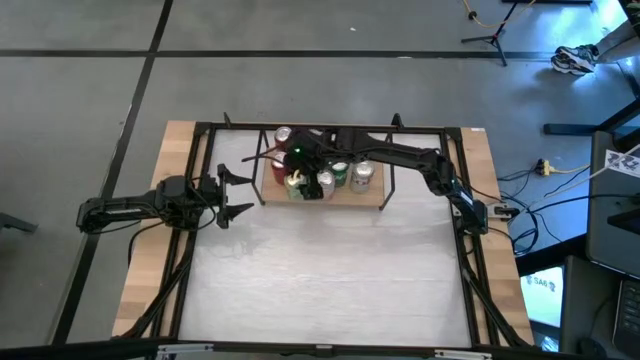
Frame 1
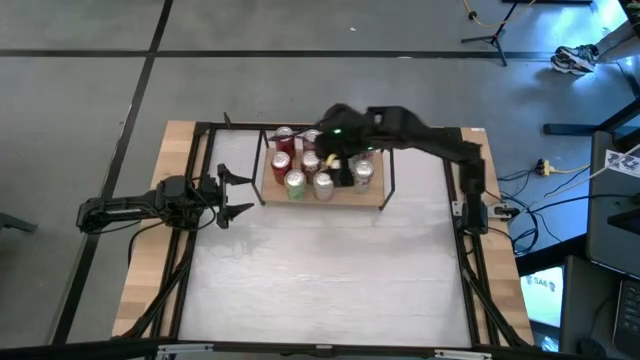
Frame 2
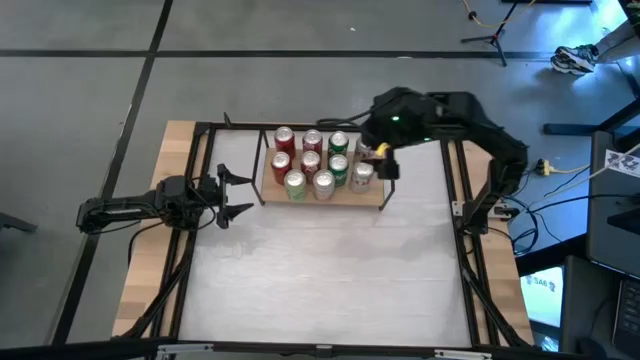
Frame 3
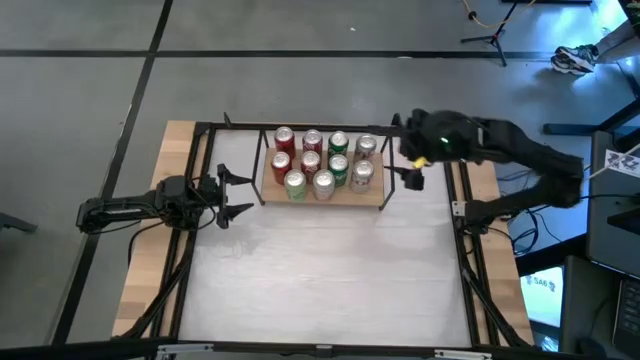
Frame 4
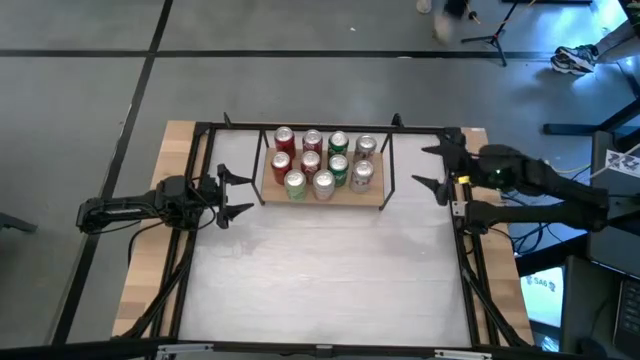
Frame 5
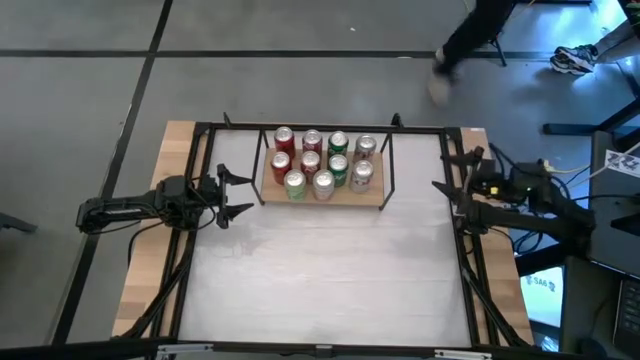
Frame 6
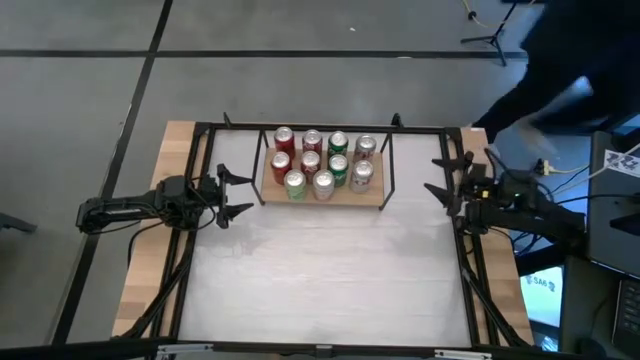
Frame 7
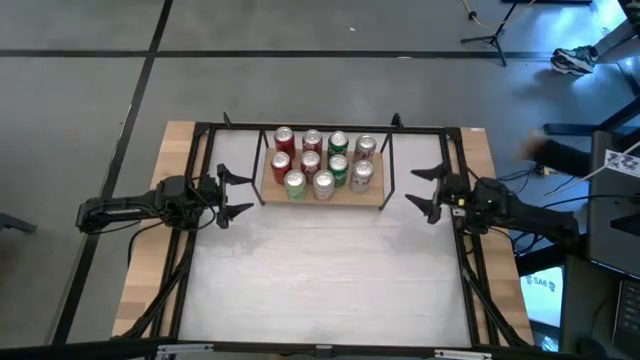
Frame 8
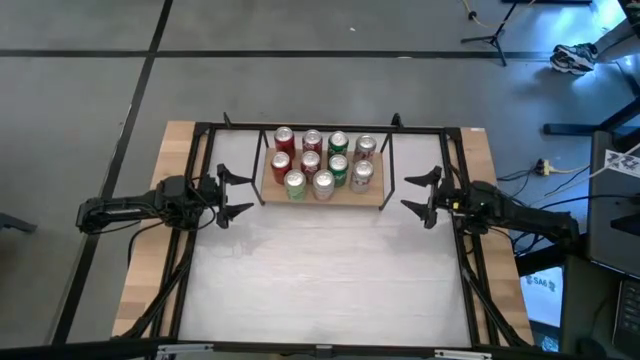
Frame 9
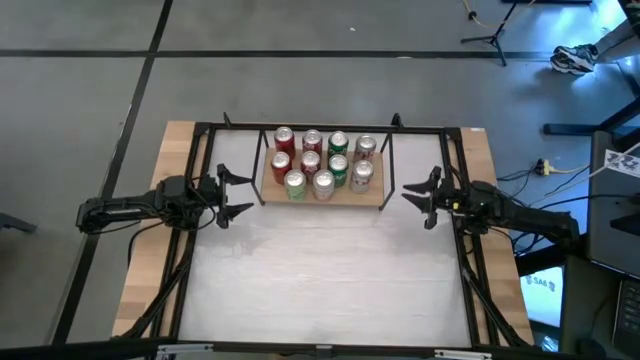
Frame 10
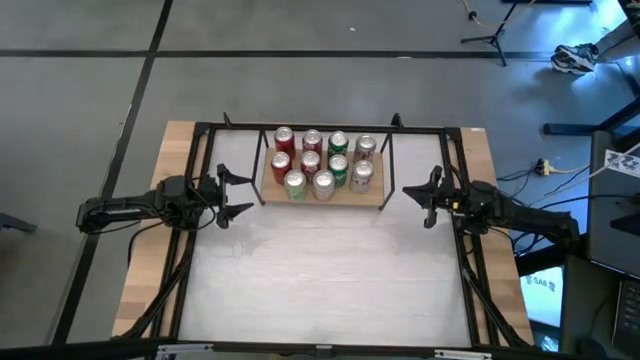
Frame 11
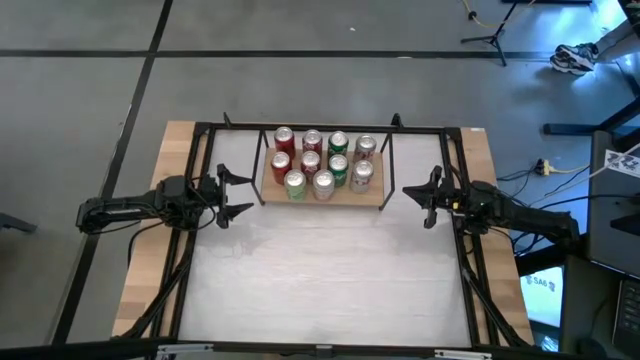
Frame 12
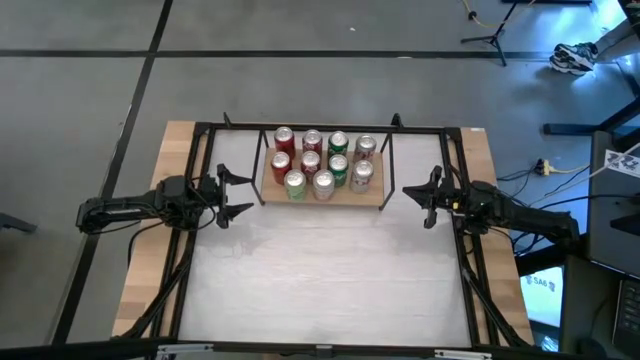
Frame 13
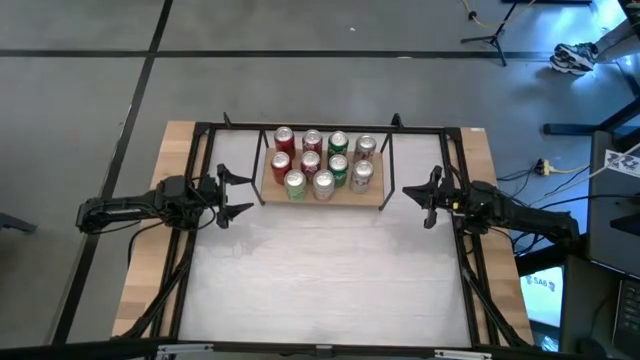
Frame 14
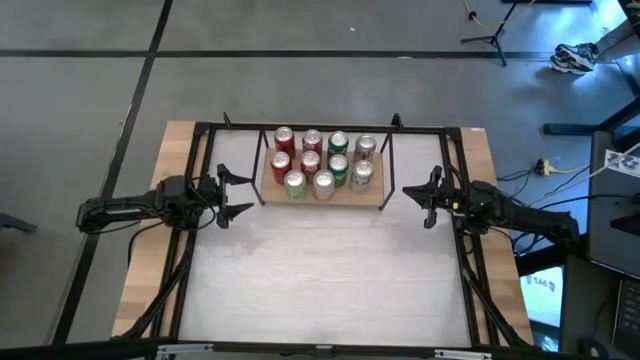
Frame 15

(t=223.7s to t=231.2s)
Task: Place canned beverage on shelf
Return to Home Position

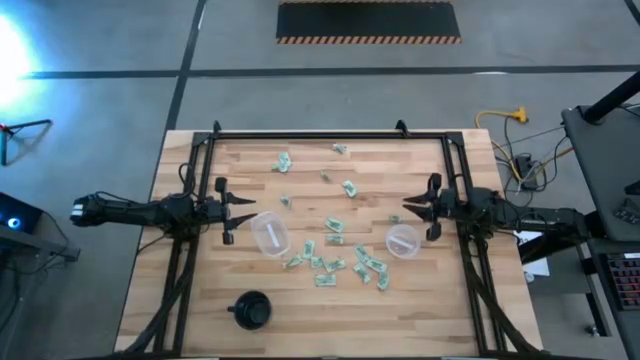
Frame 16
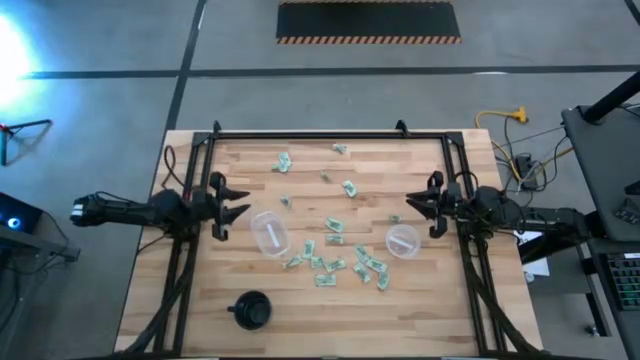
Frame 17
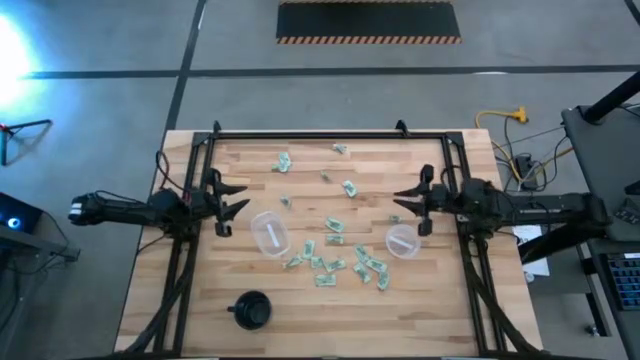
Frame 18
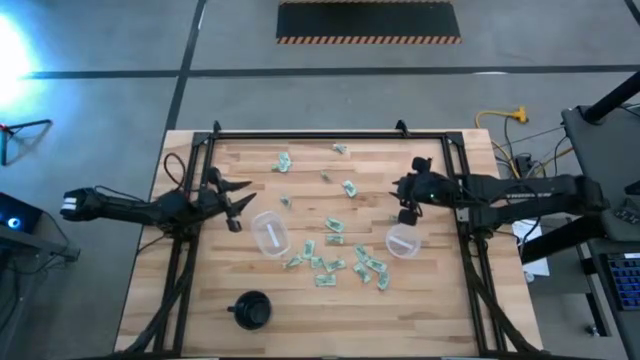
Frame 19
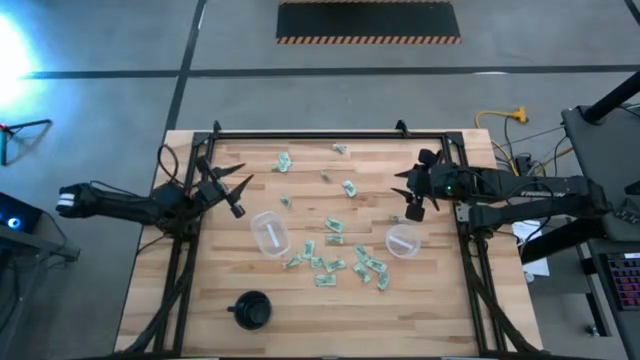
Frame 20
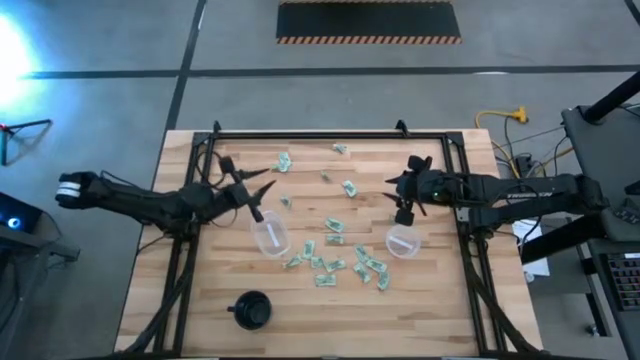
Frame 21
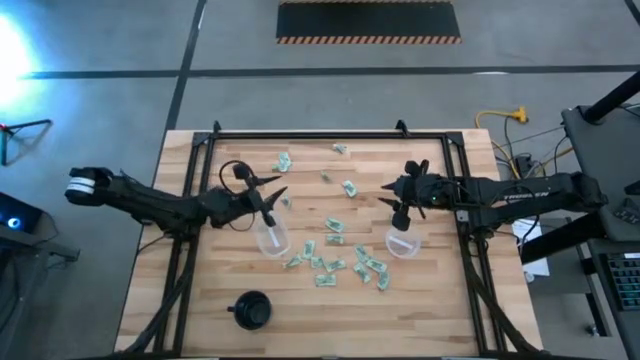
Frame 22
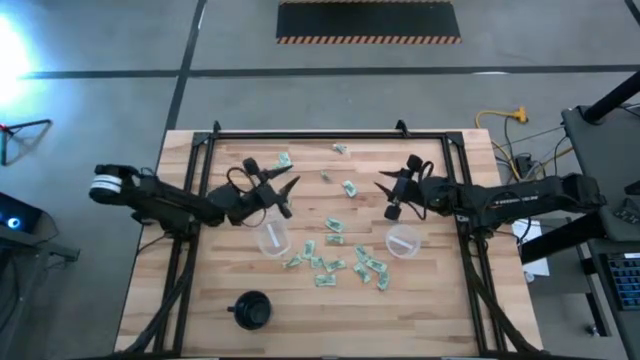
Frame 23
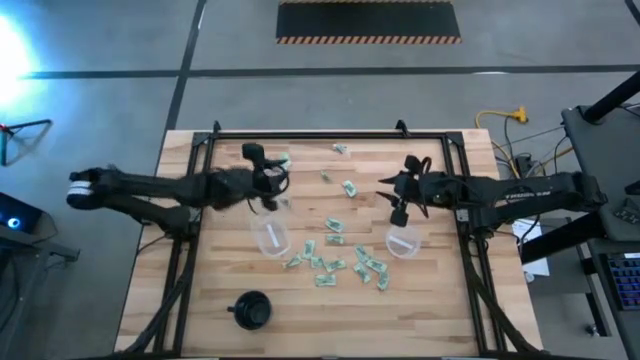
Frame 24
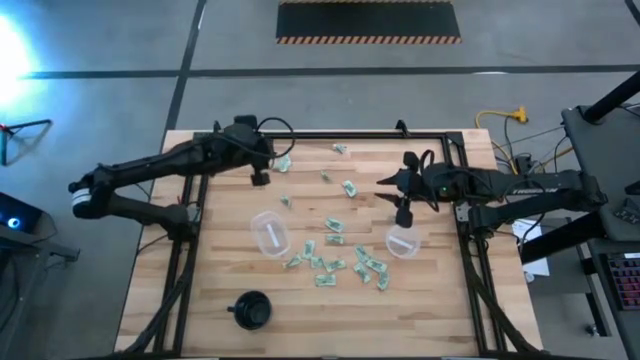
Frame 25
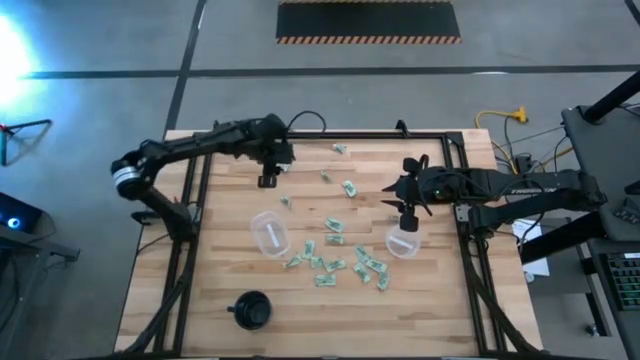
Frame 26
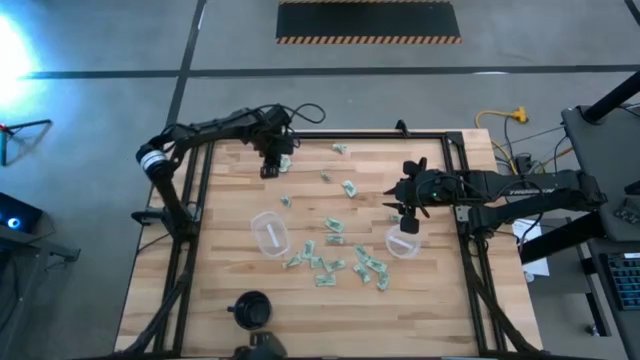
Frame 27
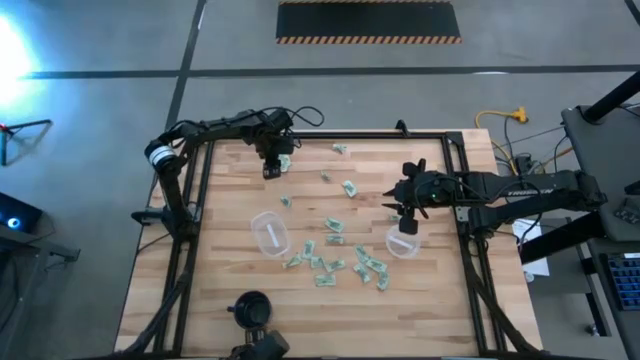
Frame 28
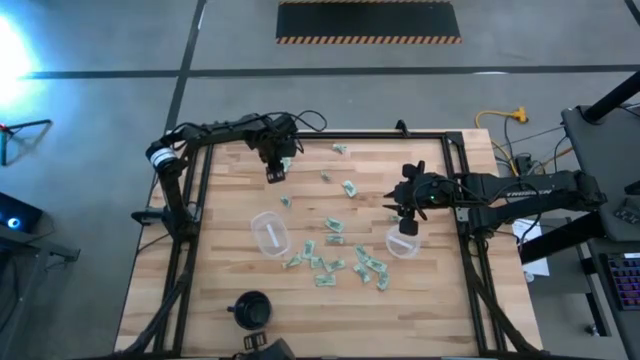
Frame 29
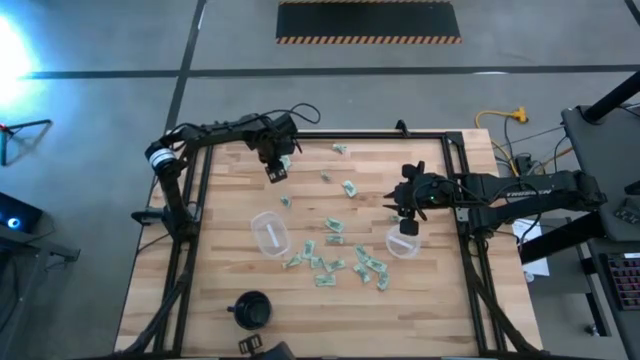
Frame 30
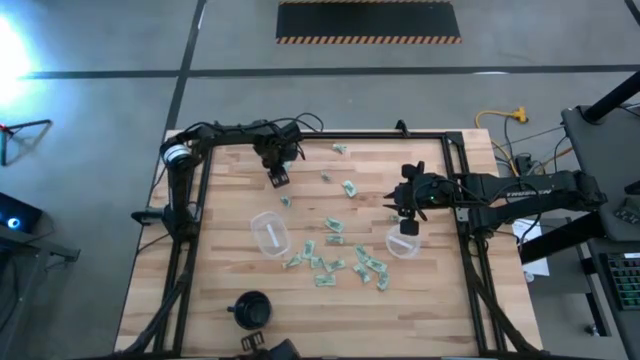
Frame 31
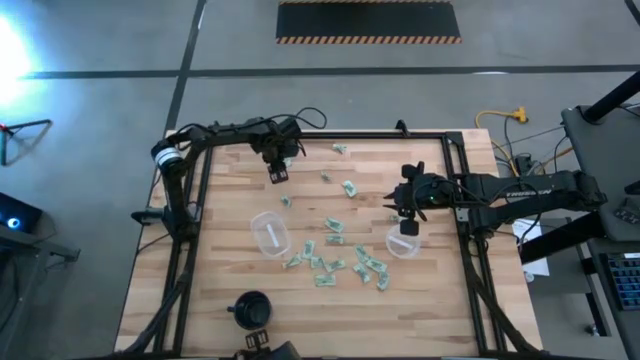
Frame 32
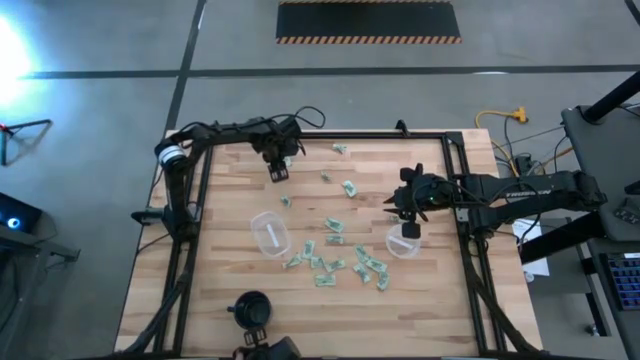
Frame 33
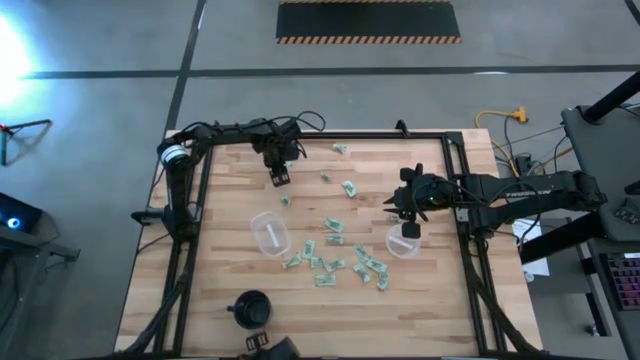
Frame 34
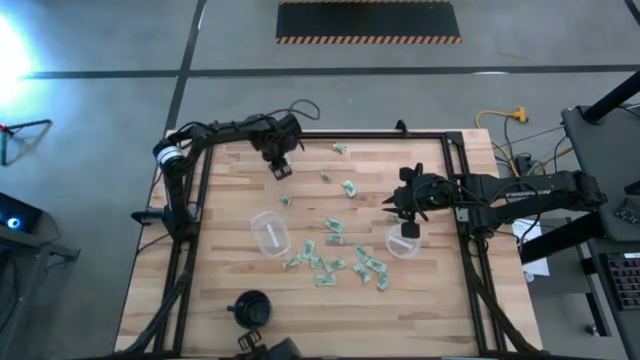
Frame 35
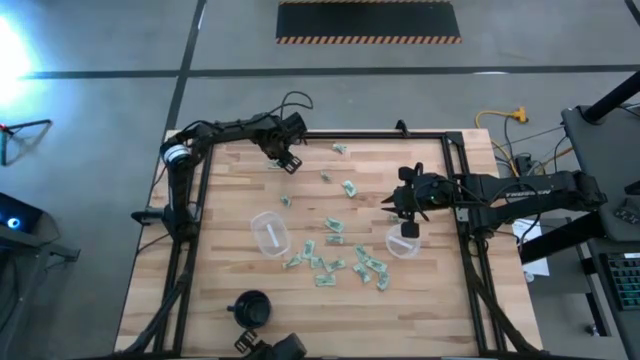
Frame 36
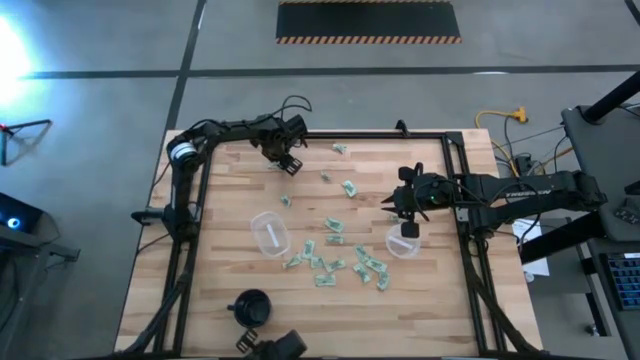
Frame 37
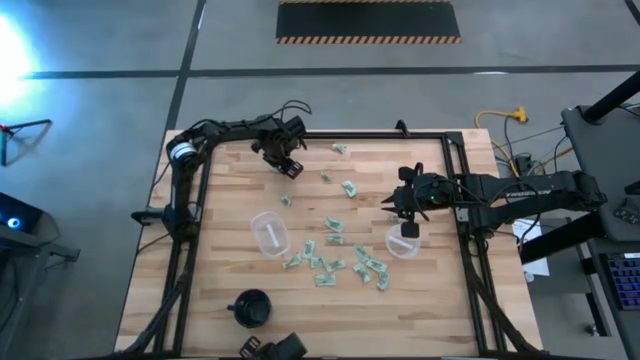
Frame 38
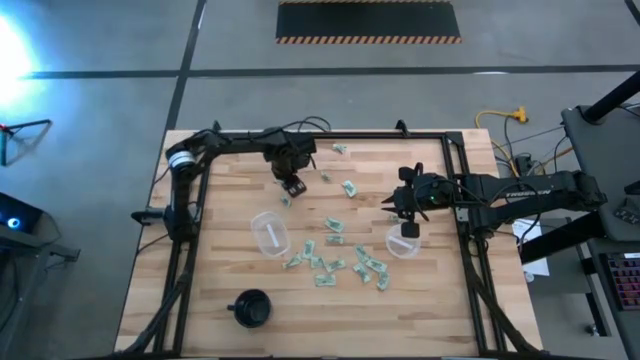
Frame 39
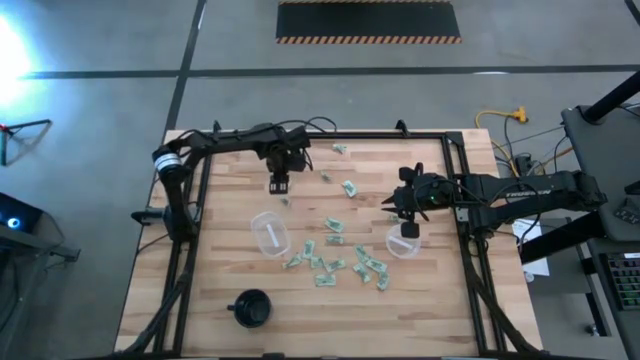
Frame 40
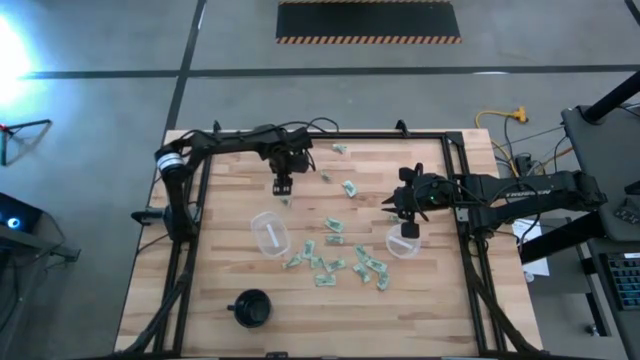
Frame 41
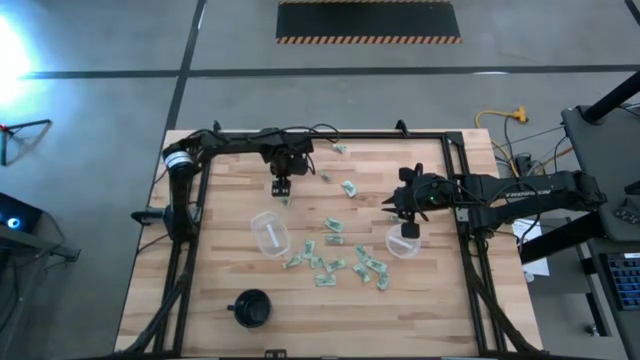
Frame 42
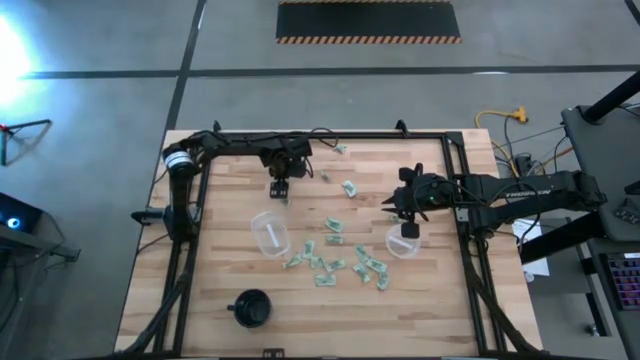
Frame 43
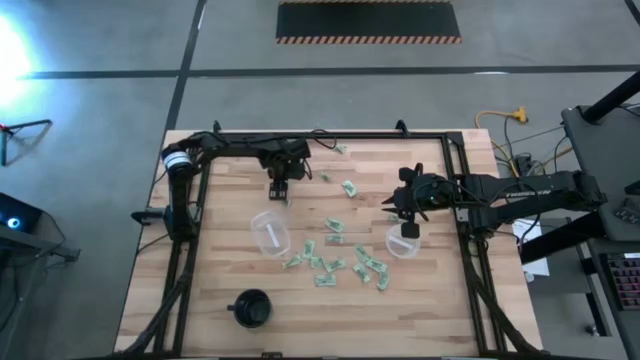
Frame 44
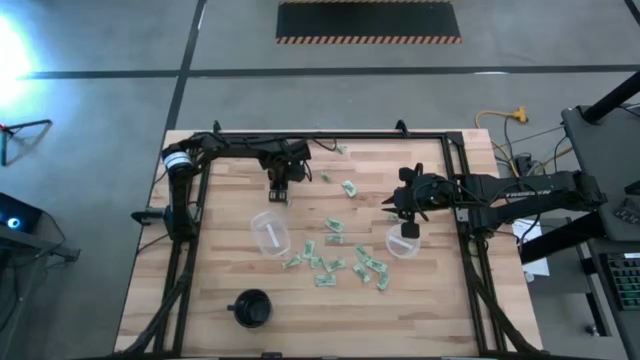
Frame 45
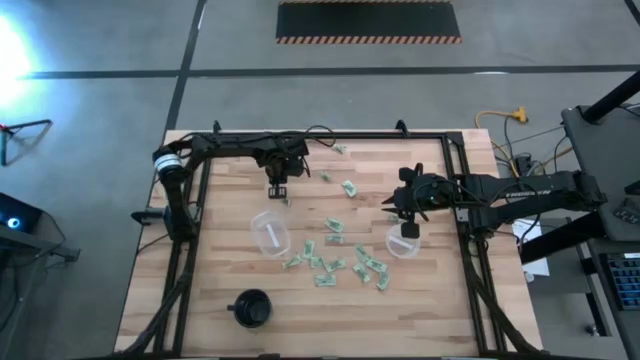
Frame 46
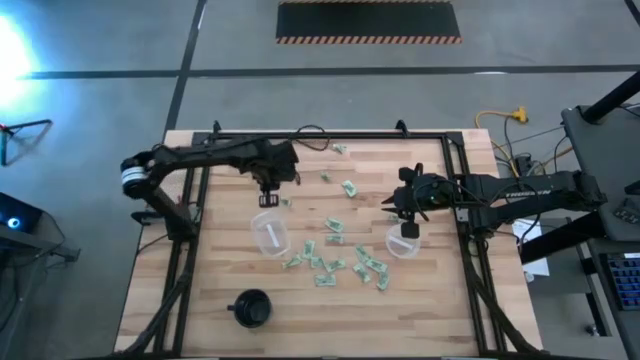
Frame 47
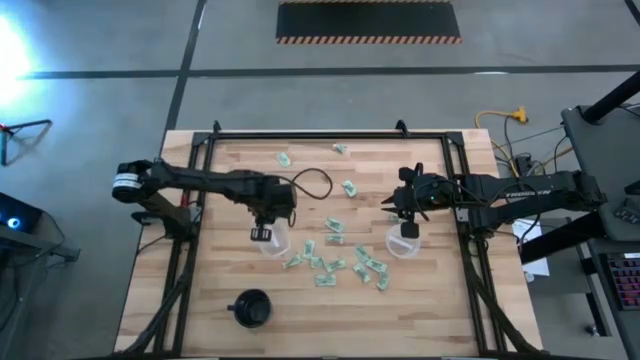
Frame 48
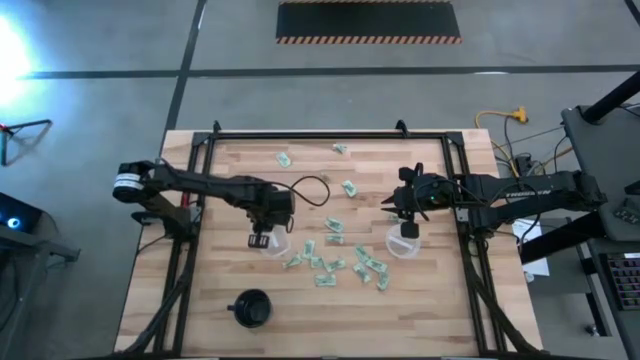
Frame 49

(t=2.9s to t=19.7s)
Task: Pick and place Stevia / Truvia into bins
Put the stevia packet into the oval transparent container
